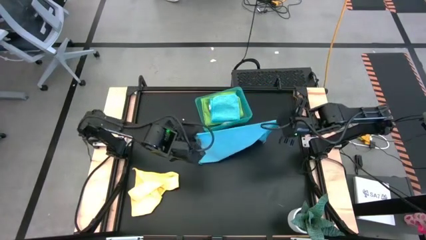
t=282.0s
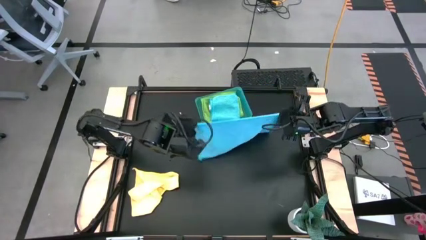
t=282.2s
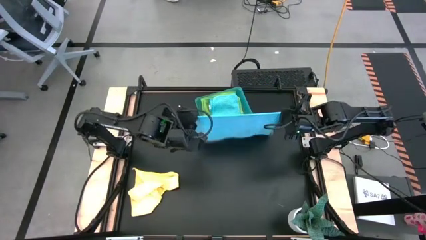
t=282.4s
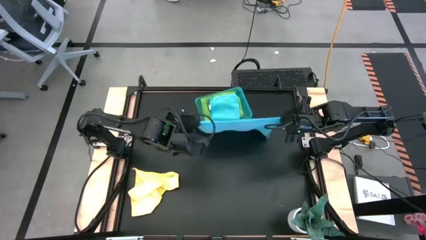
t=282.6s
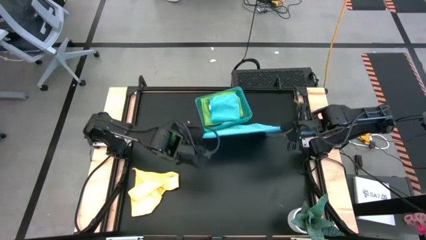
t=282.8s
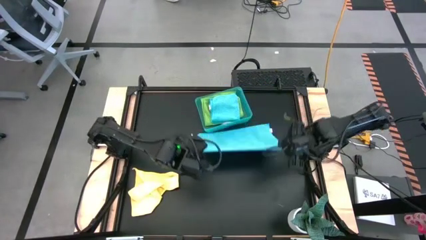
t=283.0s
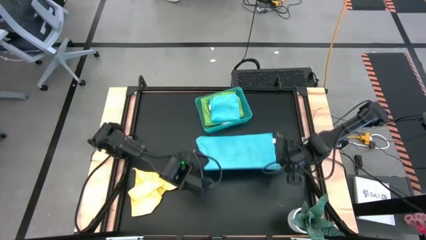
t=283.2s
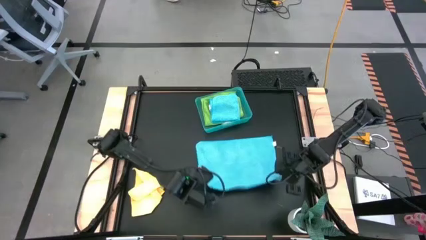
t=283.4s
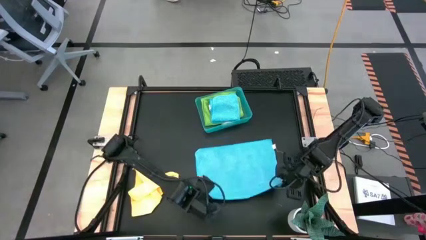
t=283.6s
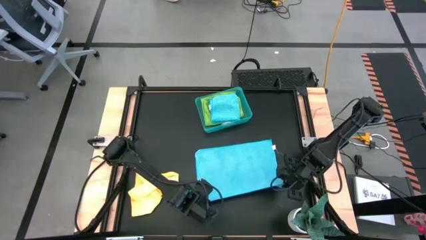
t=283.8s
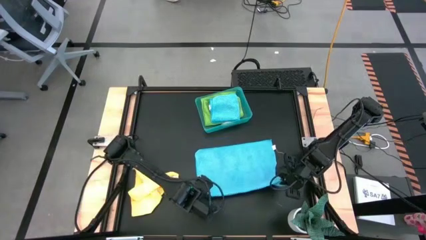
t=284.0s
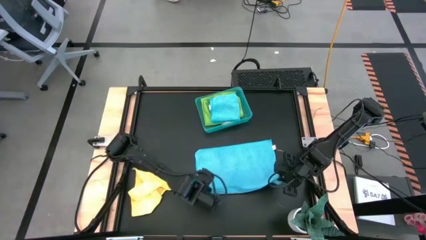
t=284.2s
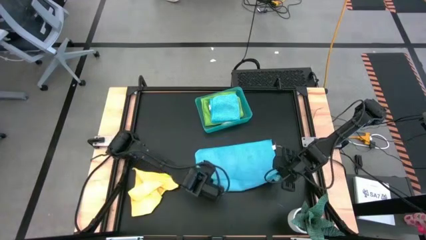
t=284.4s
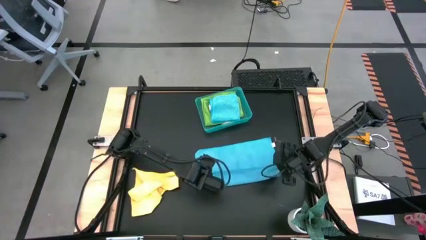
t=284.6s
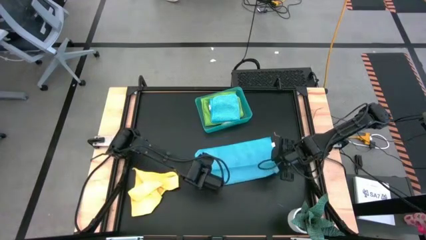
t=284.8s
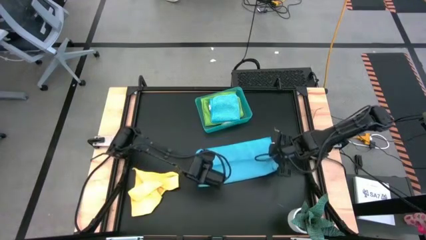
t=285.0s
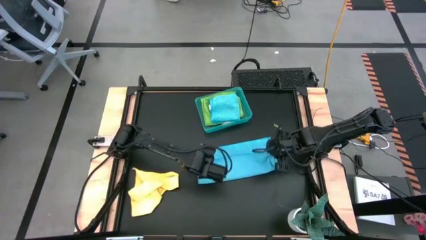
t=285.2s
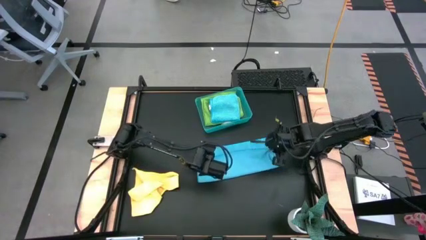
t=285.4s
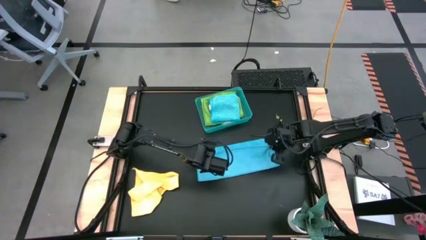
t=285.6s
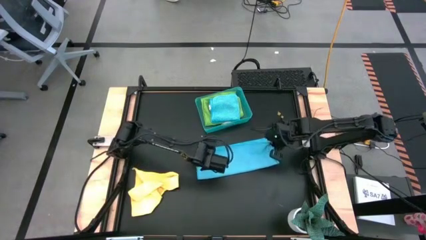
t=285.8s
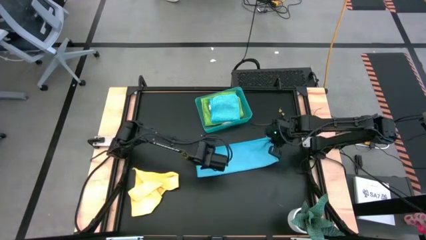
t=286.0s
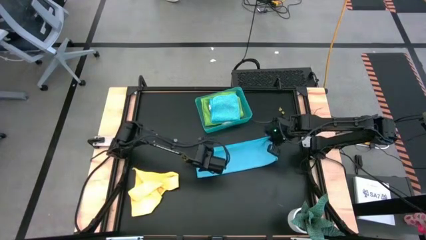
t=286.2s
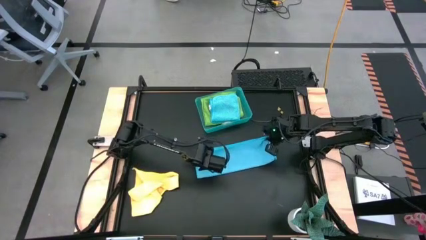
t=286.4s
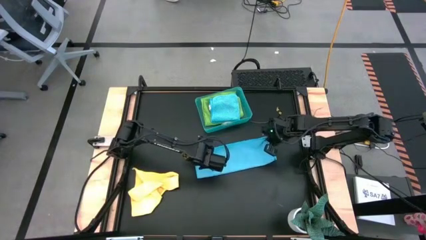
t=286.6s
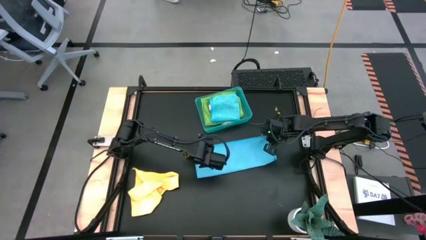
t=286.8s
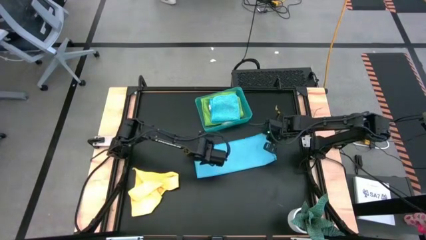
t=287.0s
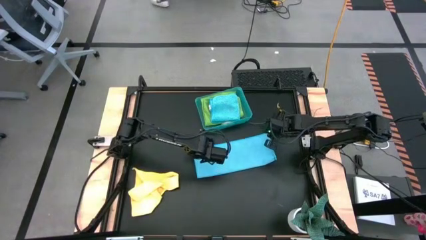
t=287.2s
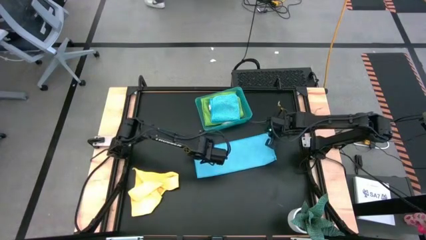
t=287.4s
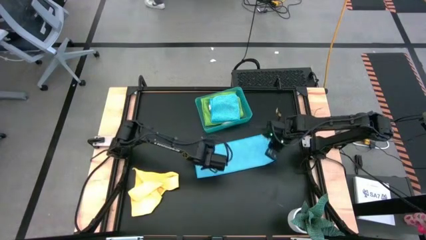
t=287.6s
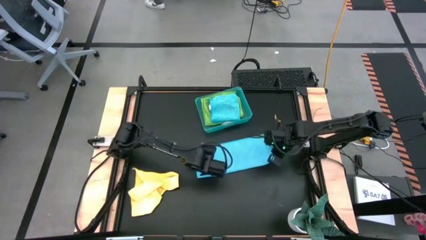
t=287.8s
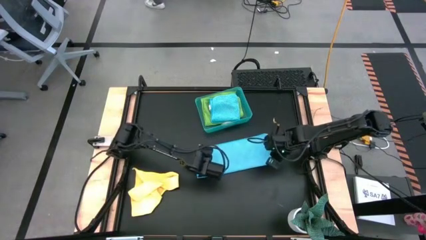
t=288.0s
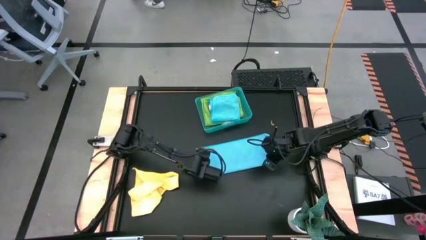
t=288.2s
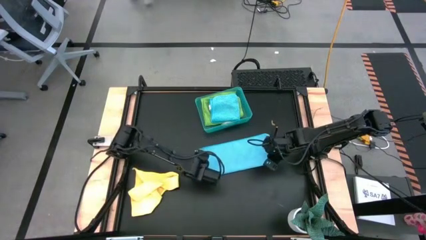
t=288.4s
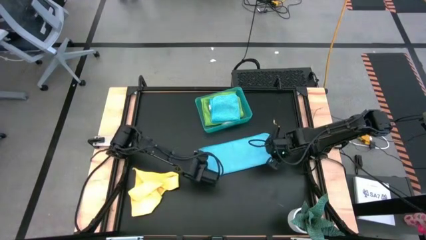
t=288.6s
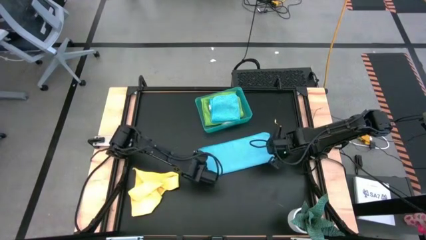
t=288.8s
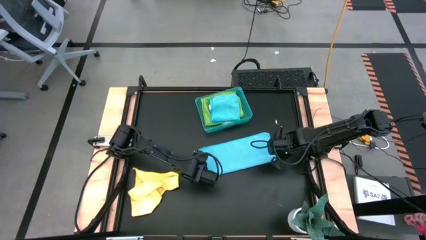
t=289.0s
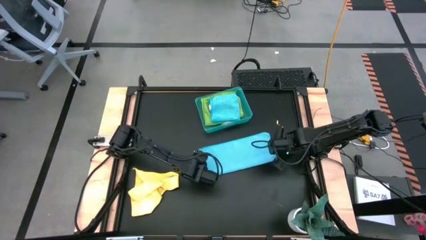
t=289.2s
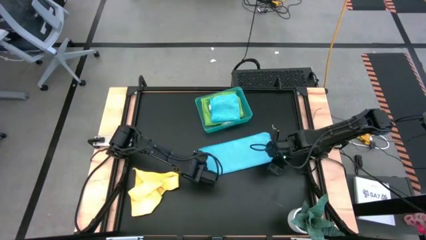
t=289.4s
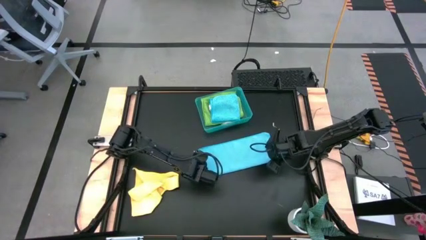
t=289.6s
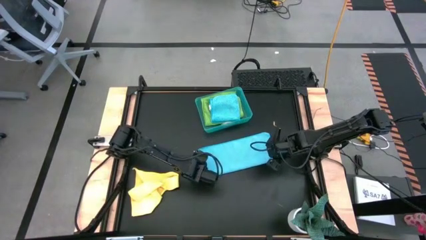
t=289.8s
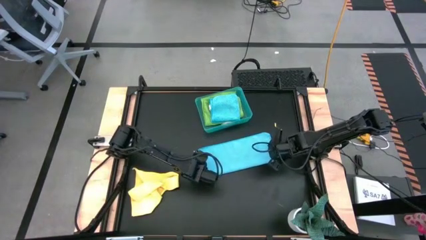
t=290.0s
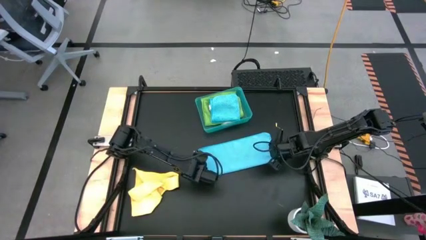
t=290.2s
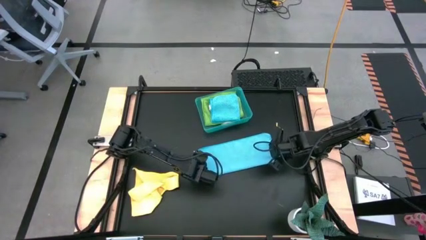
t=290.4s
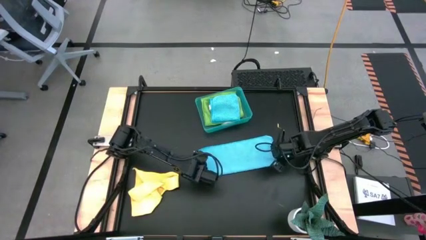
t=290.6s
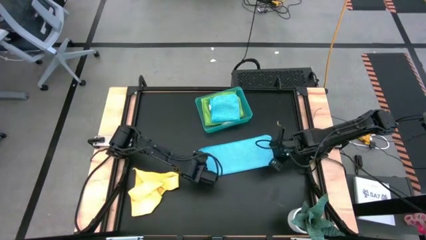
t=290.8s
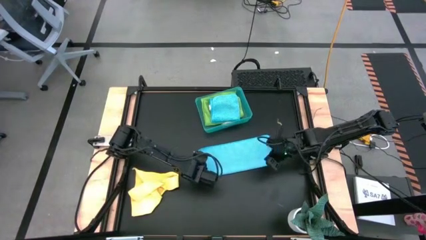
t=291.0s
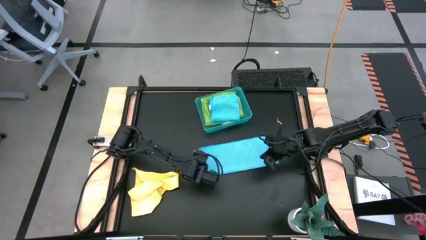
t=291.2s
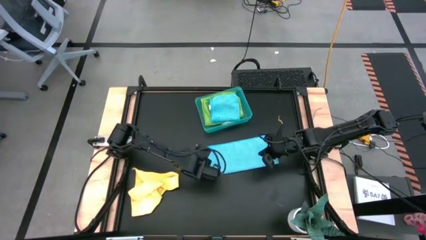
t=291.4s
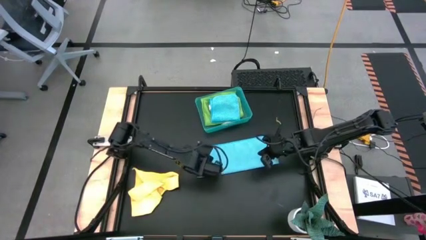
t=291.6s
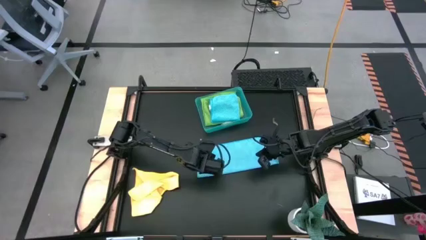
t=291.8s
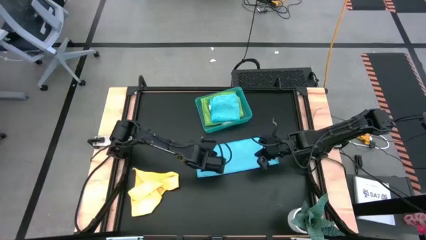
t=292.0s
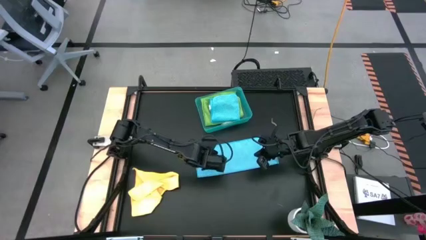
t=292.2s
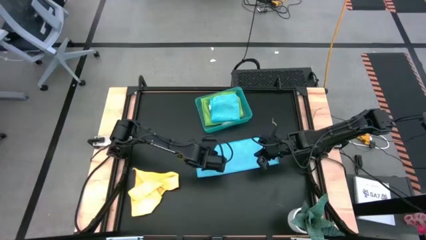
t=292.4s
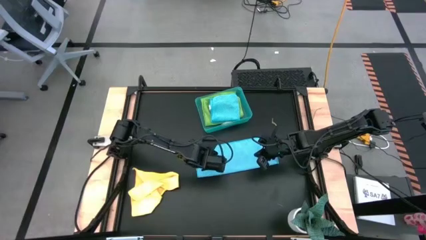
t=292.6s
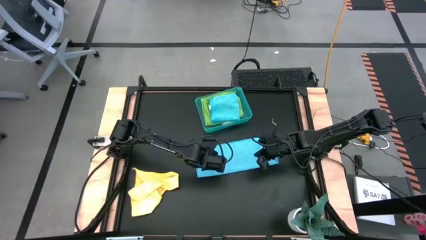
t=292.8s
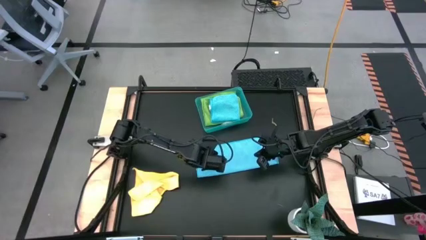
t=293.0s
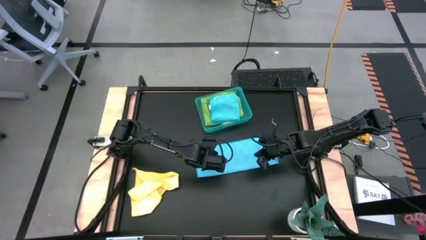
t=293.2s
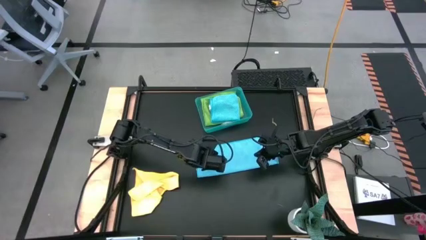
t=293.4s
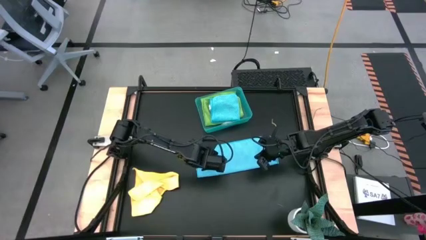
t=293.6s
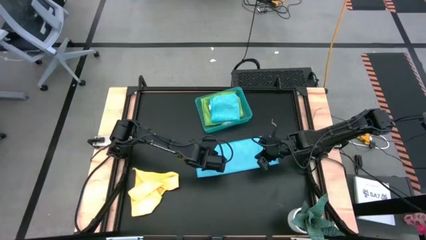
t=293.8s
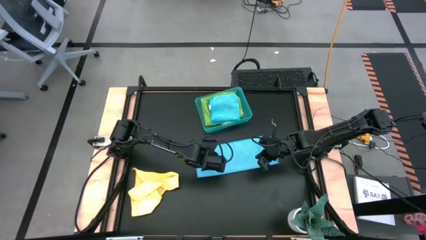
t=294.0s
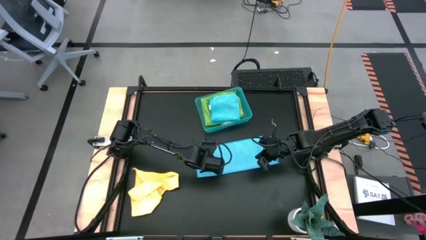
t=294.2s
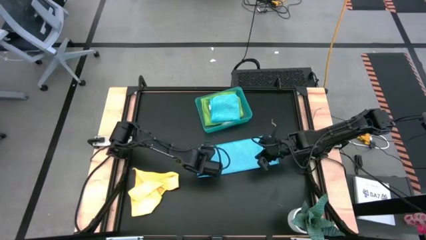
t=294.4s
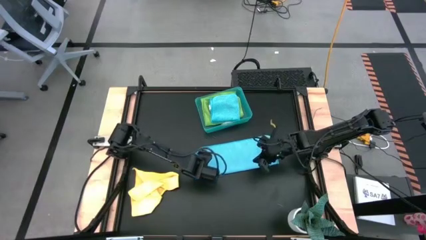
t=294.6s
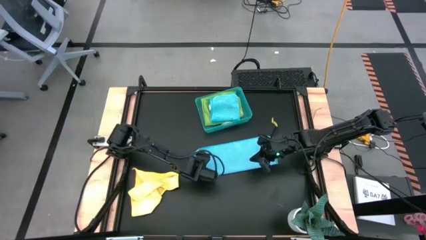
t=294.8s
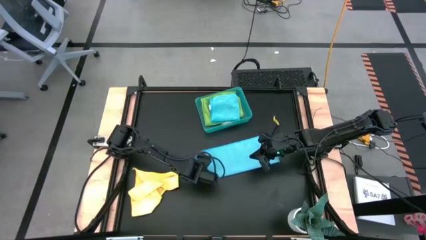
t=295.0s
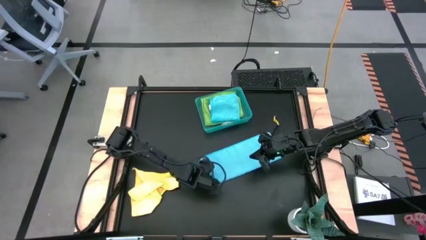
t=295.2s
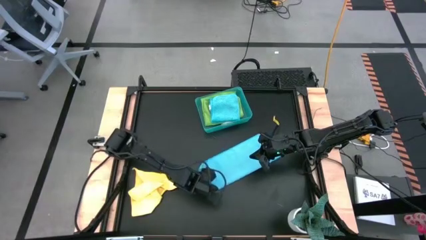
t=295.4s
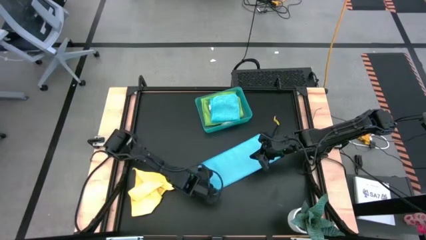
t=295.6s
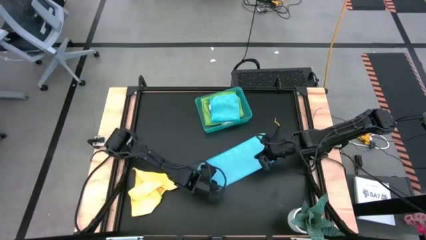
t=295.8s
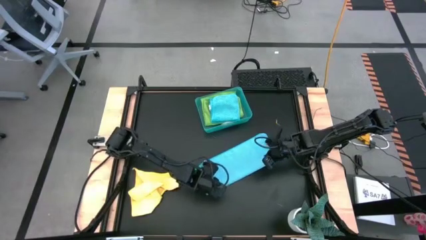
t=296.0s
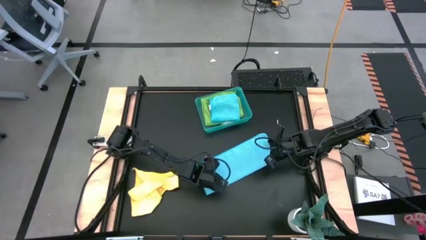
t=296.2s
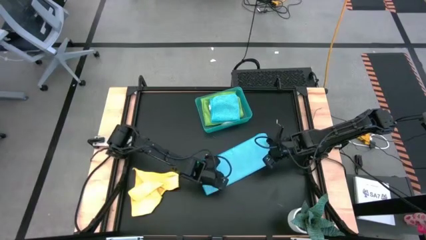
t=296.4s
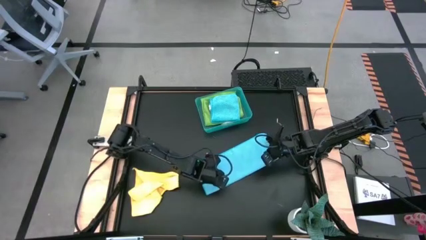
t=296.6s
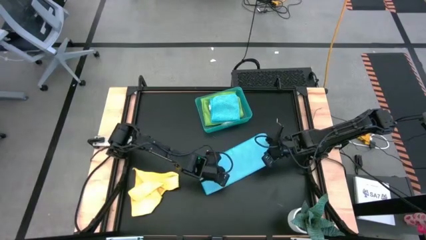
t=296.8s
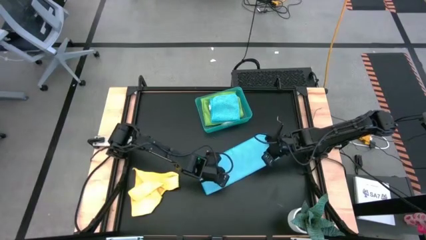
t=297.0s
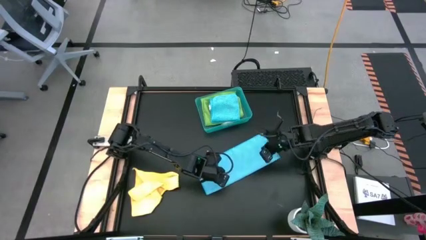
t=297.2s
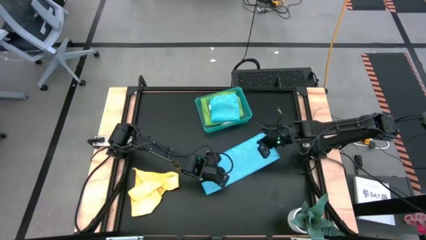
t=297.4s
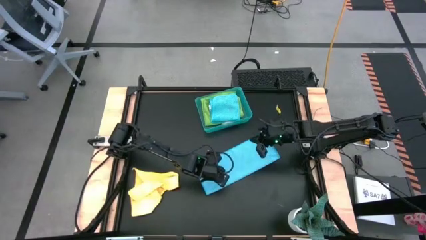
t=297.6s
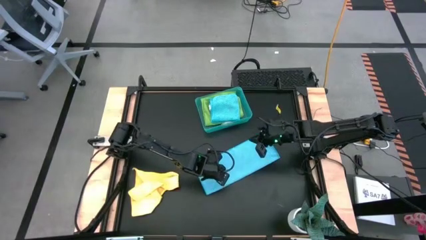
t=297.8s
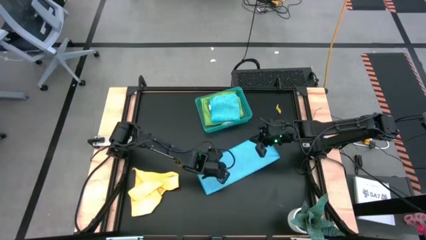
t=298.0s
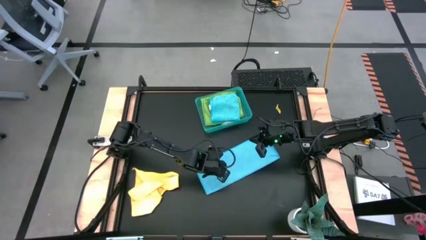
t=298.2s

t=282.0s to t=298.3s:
Task: Fold microfiber towels
Fold the blue microfiber towel
